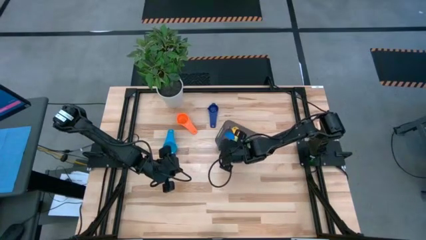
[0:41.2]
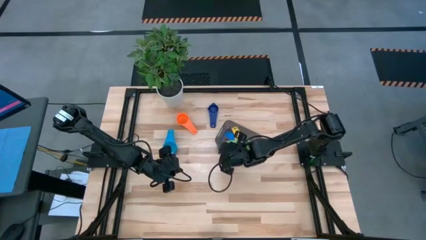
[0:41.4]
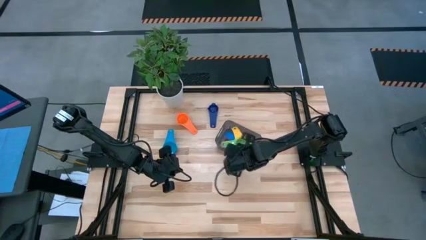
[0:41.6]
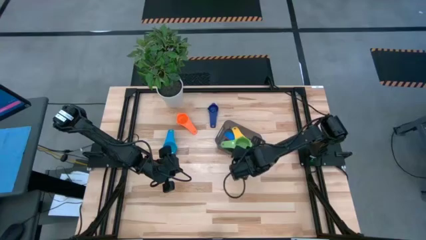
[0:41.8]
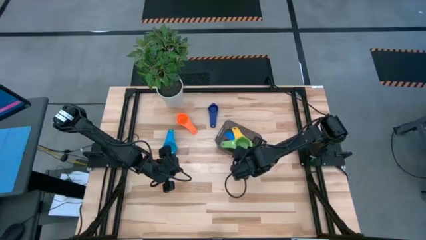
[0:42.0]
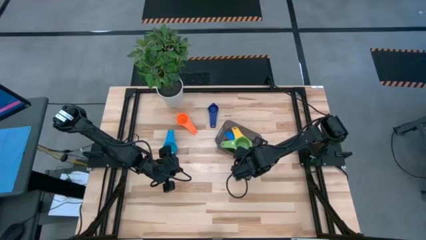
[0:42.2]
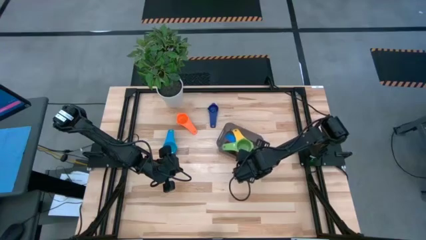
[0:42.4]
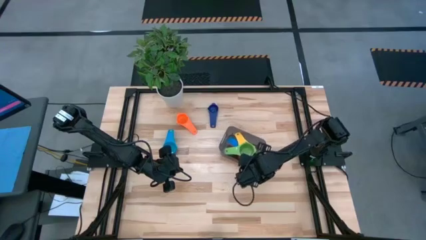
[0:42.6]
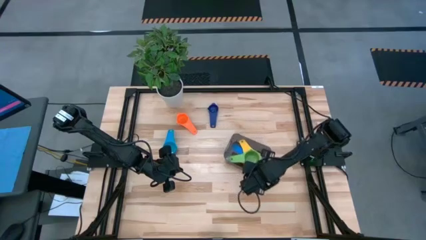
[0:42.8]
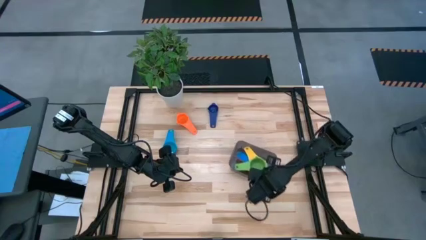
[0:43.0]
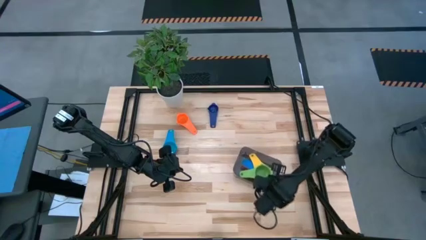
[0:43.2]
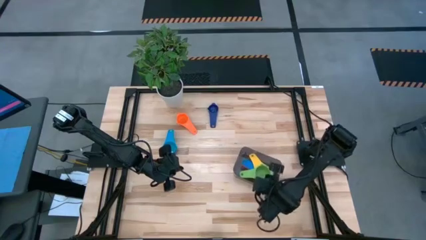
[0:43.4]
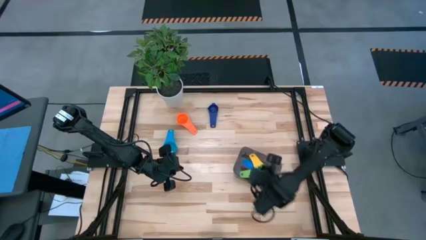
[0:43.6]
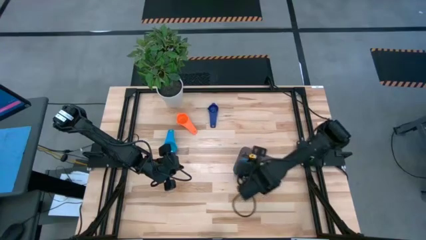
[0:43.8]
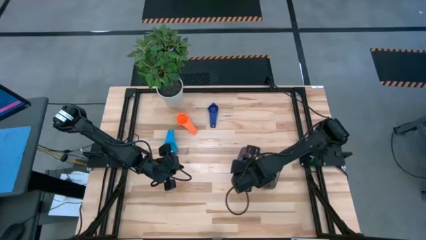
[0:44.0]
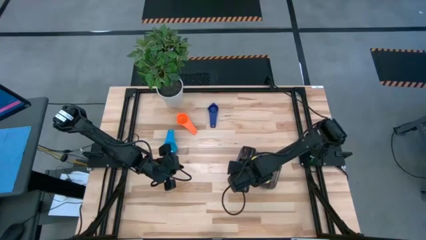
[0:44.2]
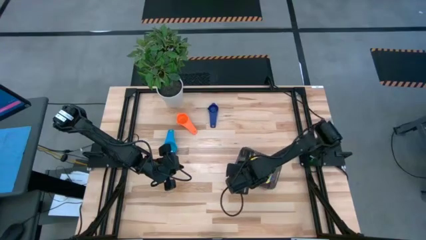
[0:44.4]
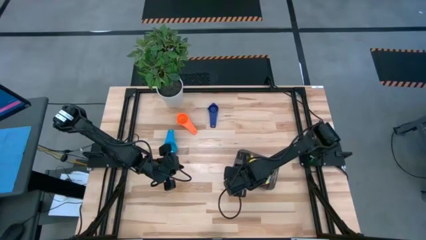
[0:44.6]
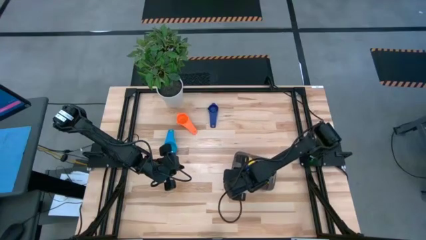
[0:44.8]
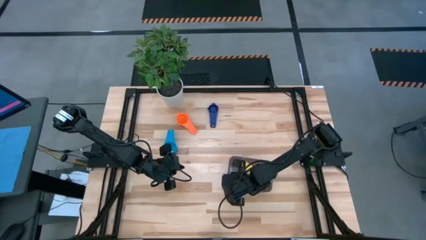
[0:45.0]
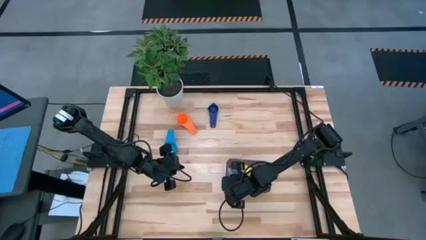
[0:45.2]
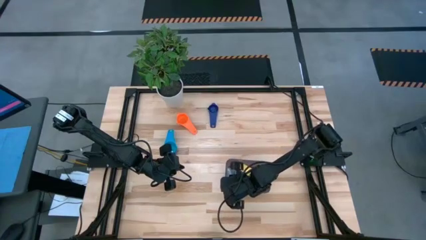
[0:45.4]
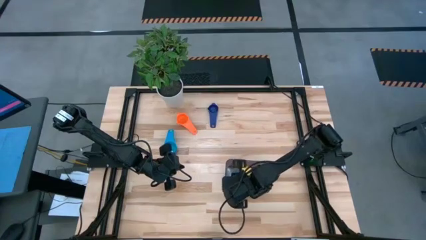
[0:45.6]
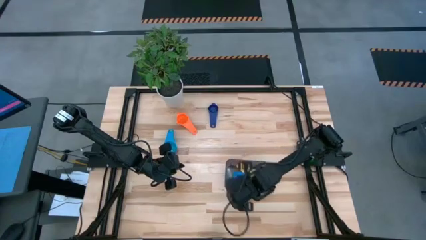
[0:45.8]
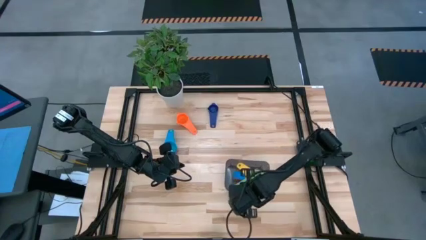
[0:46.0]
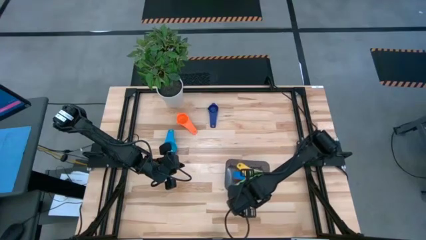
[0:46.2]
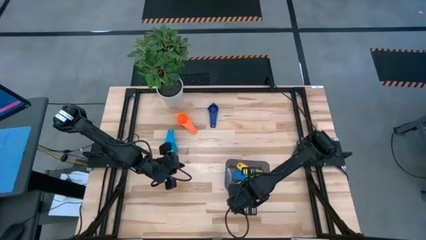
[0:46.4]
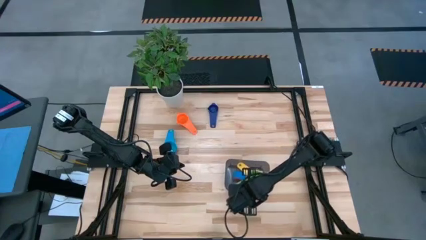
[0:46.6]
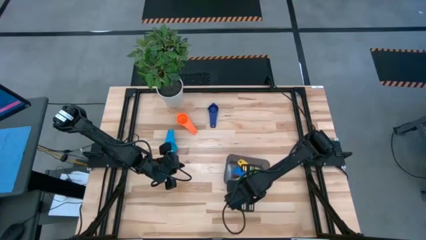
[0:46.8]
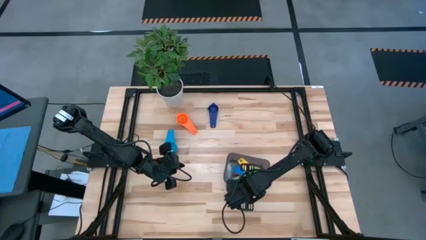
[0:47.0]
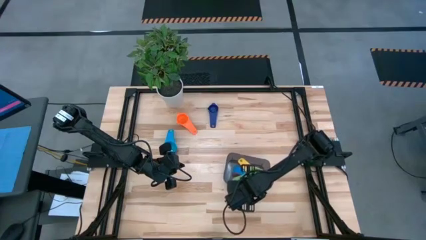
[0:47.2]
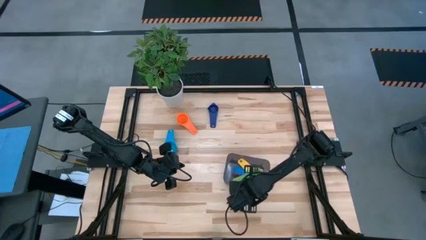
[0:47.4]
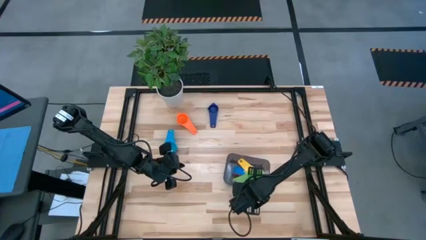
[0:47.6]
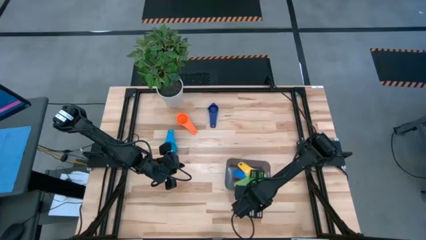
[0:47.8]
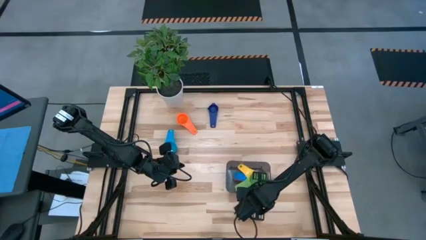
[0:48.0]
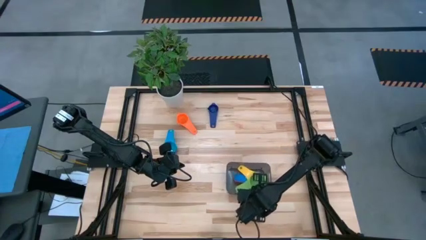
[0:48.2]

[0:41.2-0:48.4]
Task: Nest measuring cups in basket
Move the black bin to the bottom center

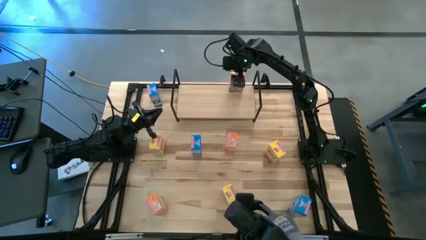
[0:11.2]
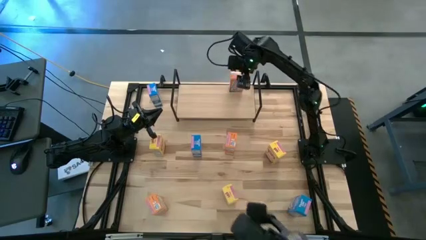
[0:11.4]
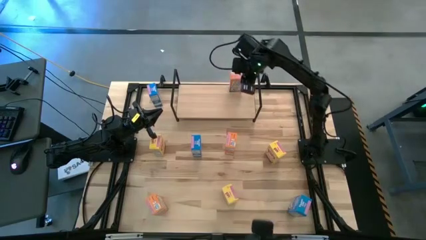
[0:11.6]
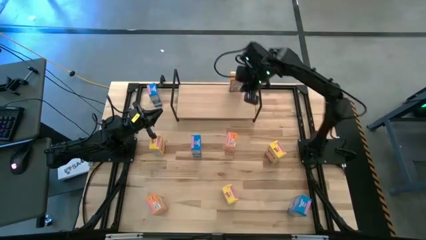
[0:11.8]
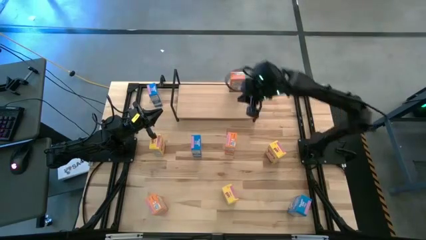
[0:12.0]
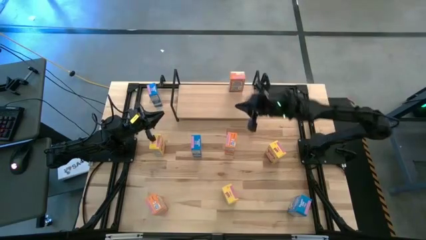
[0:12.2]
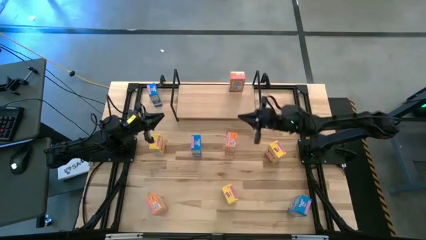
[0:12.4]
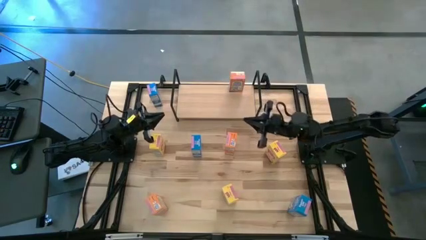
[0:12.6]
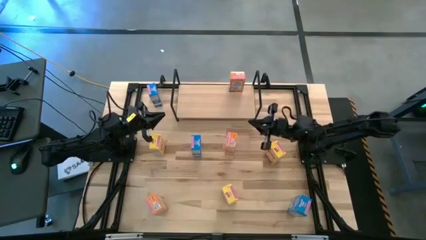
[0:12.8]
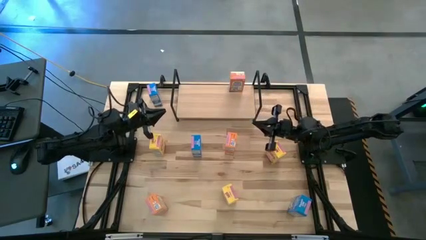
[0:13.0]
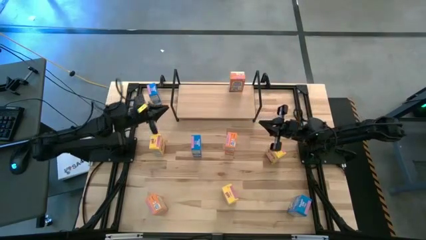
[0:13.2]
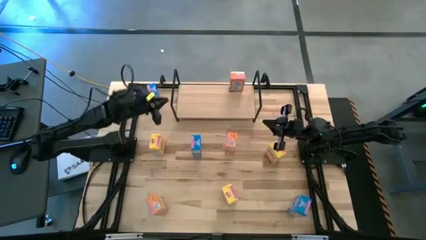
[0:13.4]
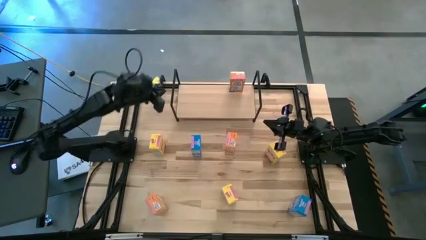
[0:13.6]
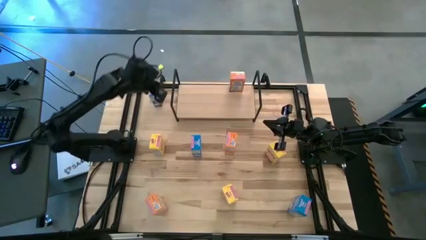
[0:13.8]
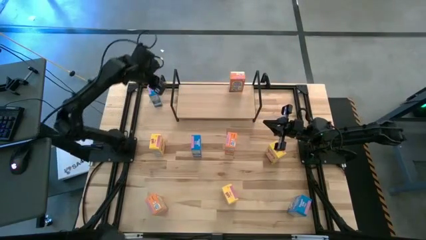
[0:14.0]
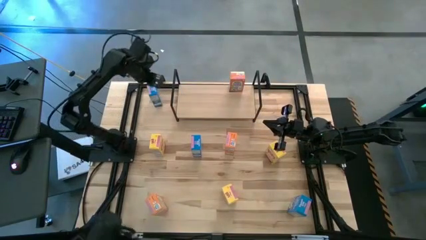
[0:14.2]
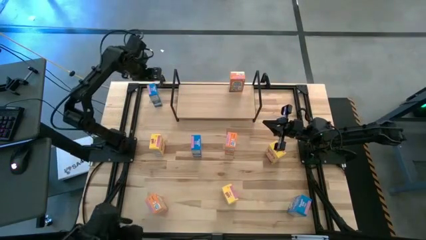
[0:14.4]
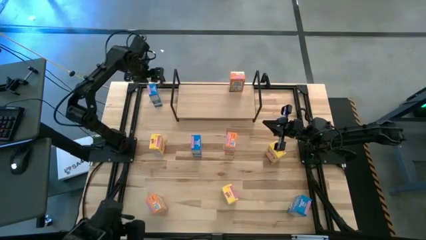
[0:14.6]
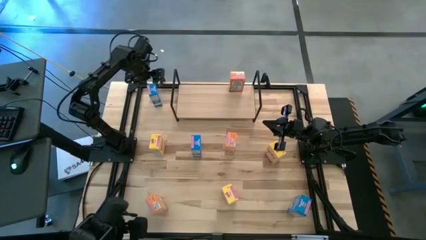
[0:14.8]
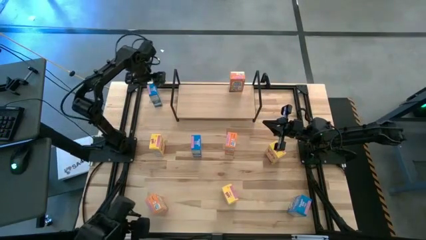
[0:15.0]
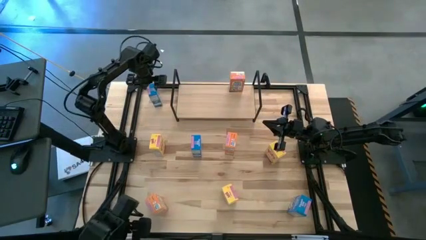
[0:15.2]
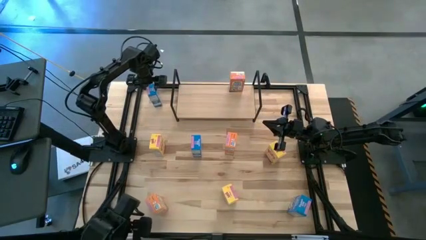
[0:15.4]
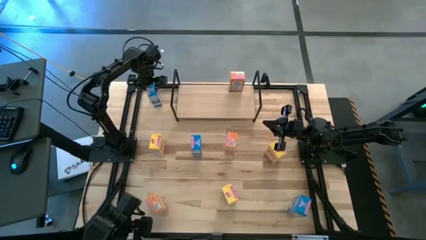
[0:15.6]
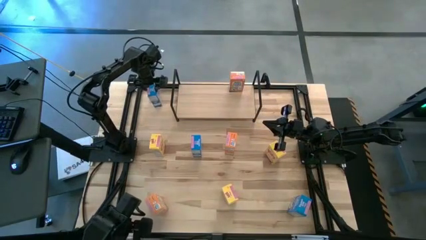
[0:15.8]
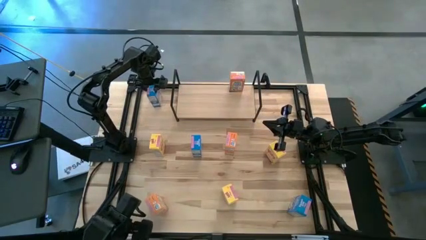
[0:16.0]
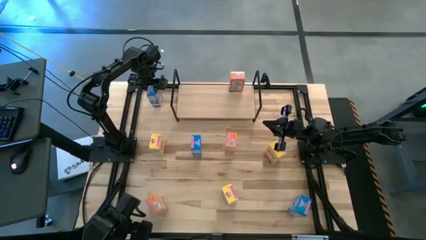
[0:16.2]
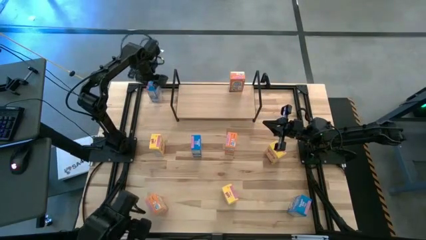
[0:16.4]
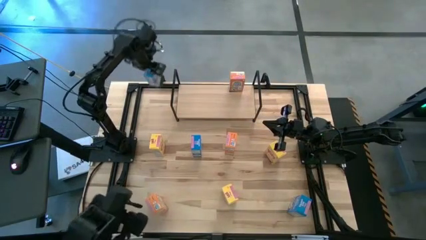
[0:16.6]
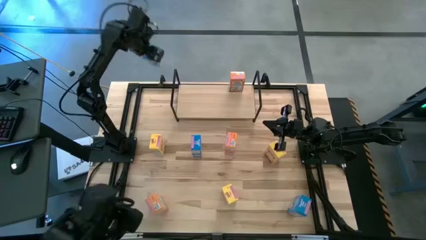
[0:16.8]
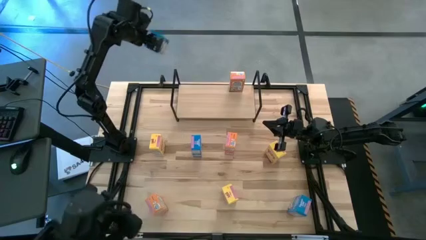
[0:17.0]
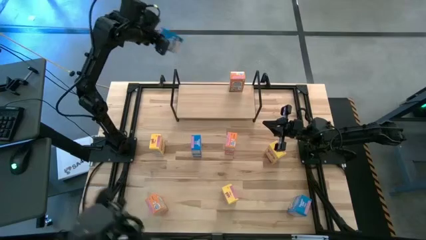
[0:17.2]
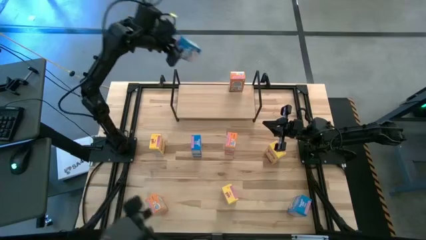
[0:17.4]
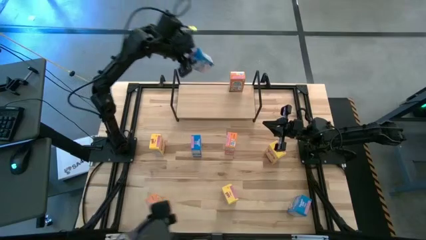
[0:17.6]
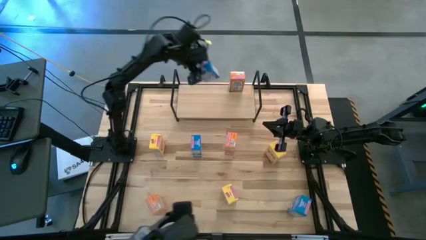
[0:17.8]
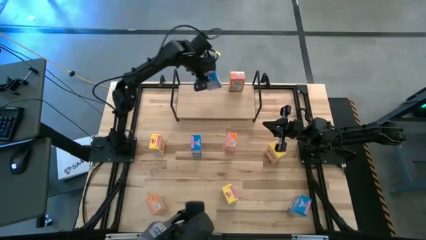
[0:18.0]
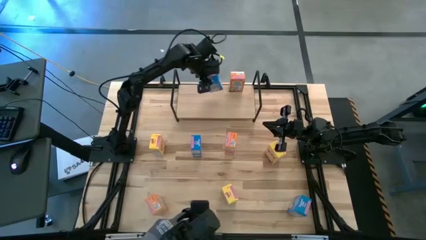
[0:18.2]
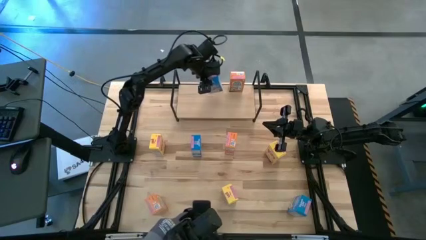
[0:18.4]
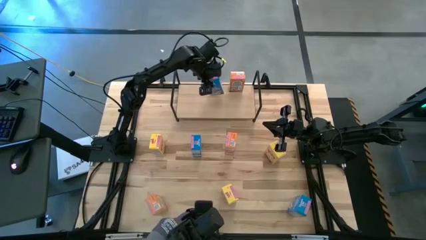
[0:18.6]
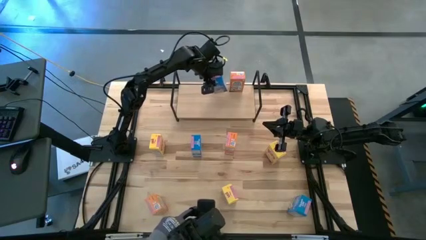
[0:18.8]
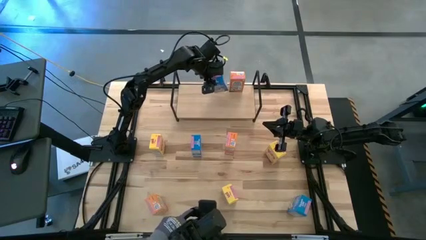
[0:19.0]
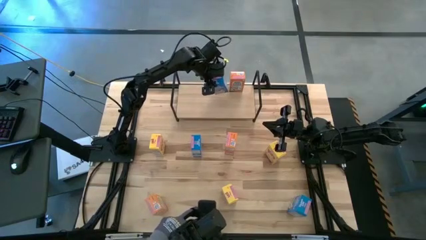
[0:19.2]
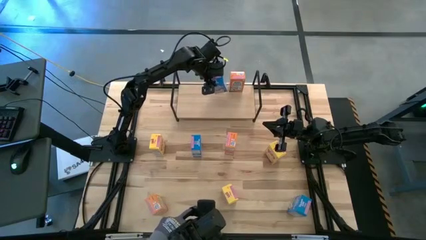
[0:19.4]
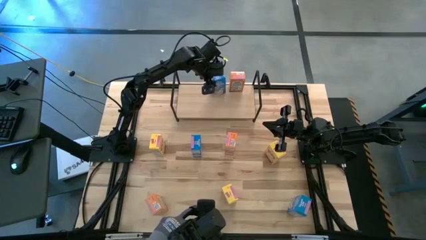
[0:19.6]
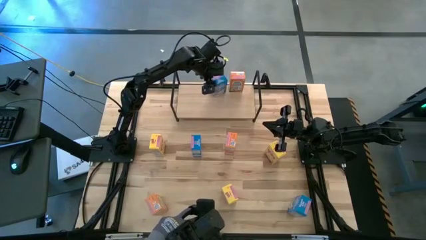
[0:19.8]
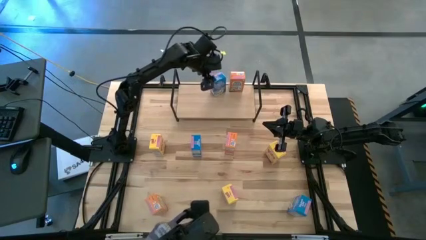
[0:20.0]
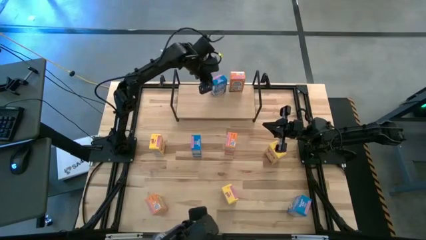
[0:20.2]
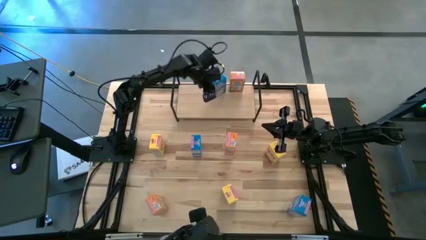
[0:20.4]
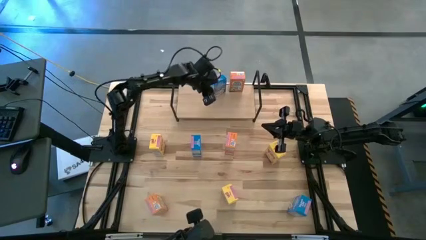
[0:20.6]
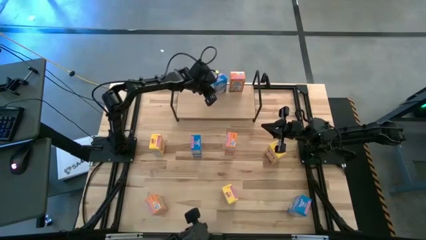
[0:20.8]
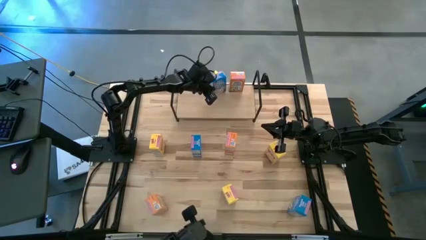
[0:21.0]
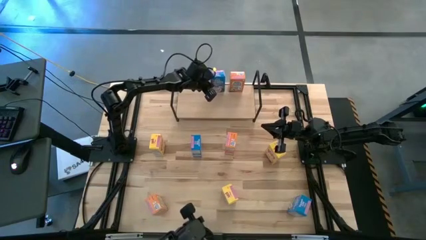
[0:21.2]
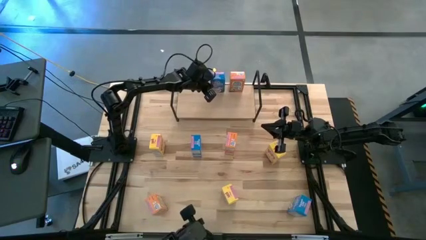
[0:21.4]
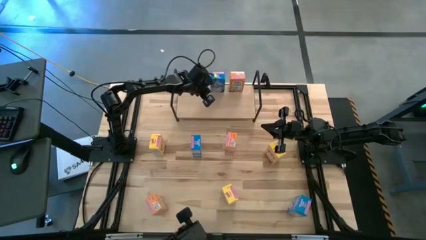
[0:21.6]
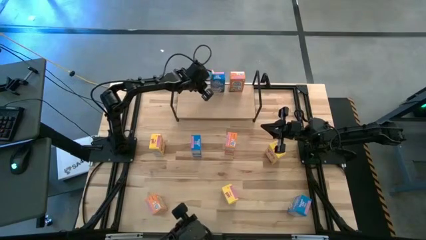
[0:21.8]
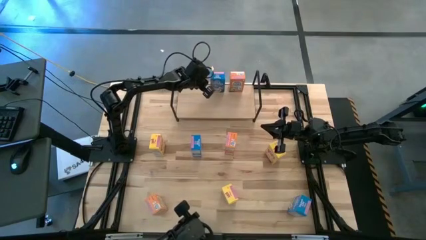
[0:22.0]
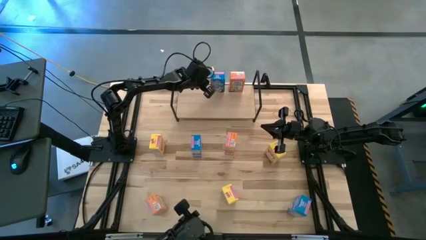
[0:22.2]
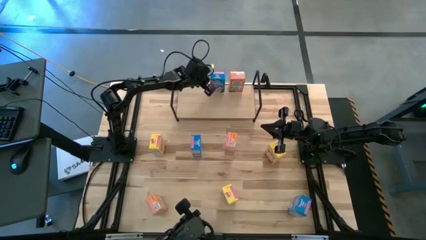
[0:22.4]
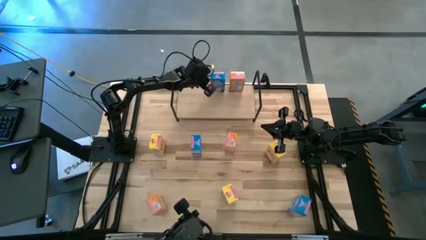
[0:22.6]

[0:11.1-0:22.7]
Task: Stack cereal on shelf
Put the top blue cereal box on the shelf
